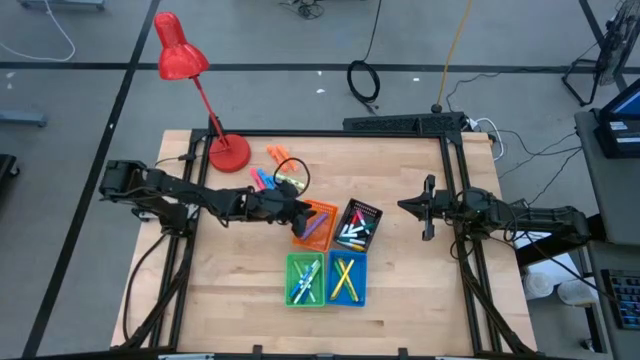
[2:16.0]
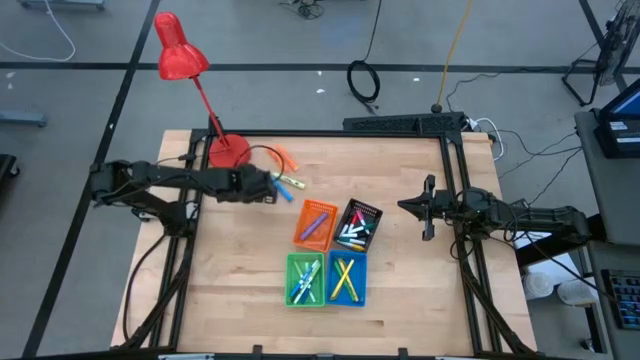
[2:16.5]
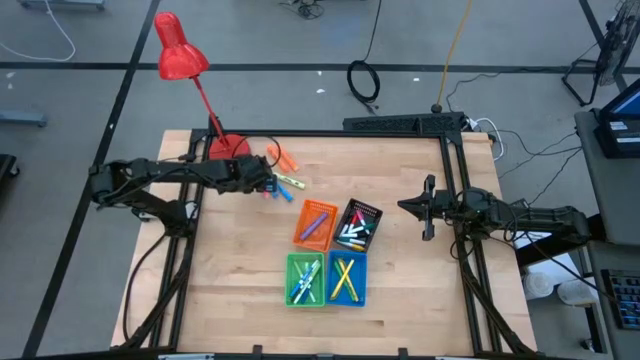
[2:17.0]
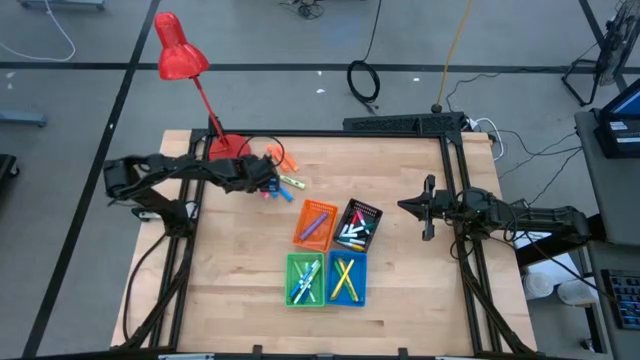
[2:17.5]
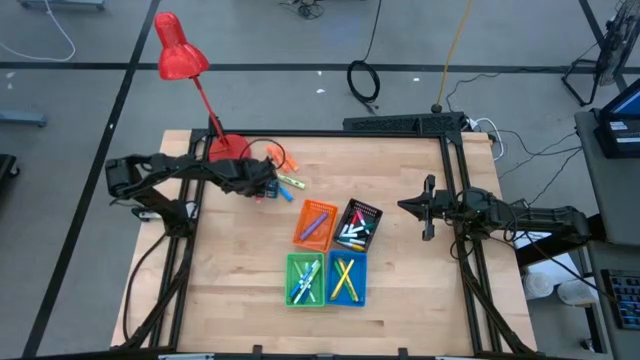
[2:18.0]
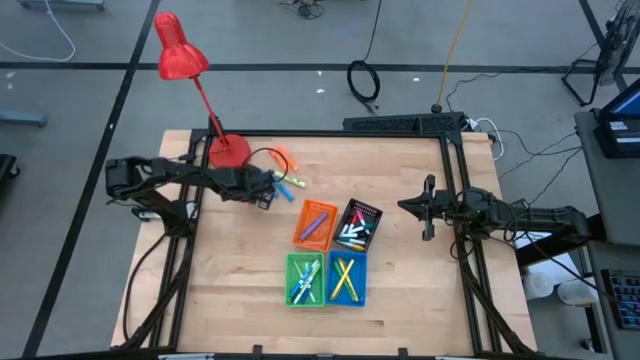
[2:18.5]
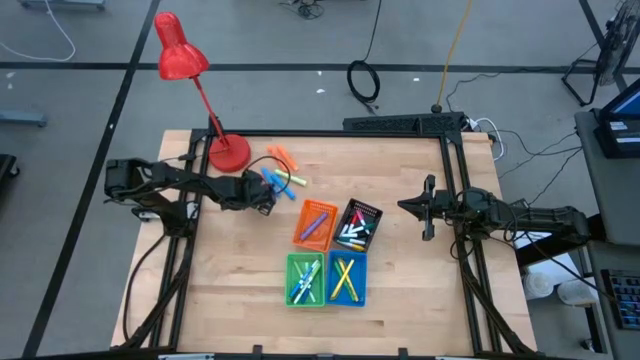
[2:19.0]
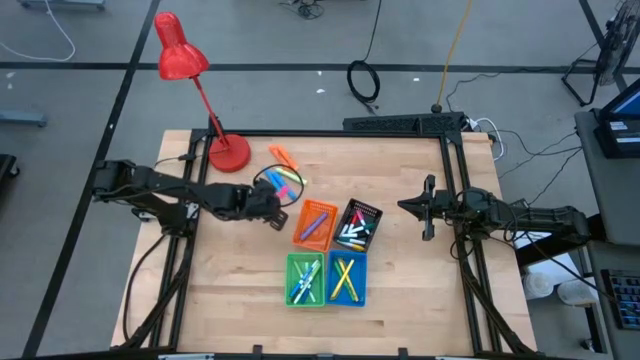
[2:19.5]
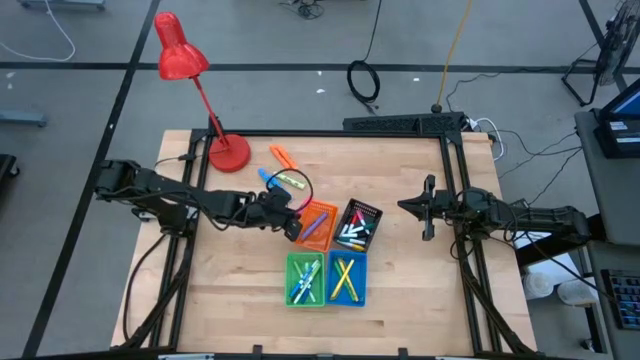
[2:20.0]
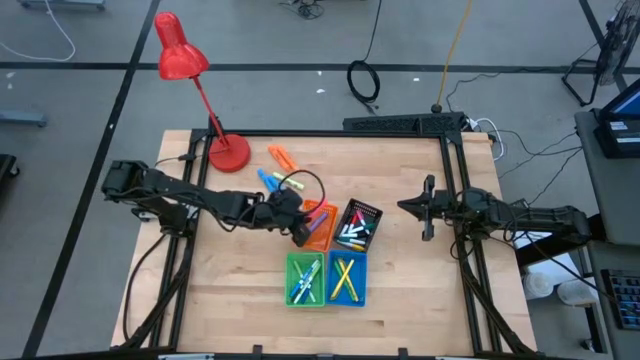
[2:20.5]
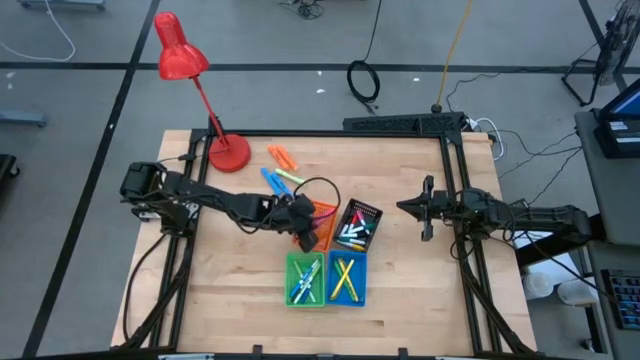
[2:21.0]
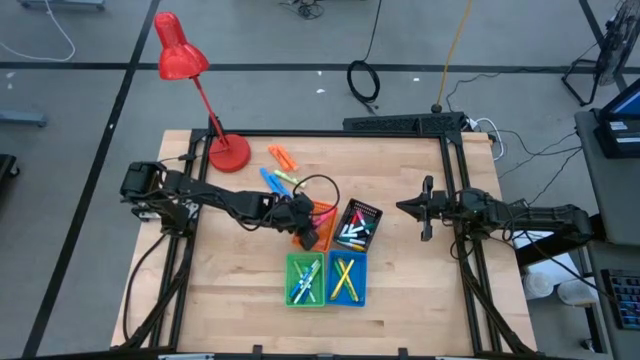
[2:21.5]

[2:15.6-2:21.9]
Task: Pick & Place Markers
Put the pink highlighter pen into the orange basket

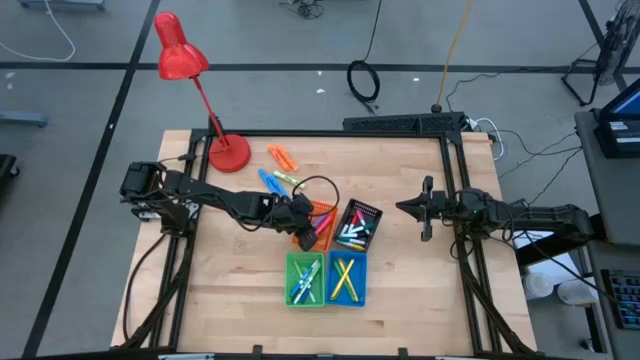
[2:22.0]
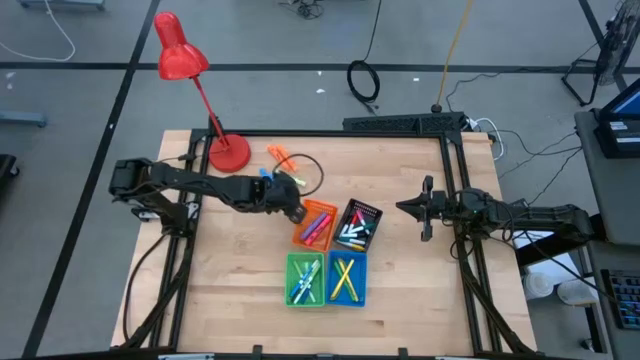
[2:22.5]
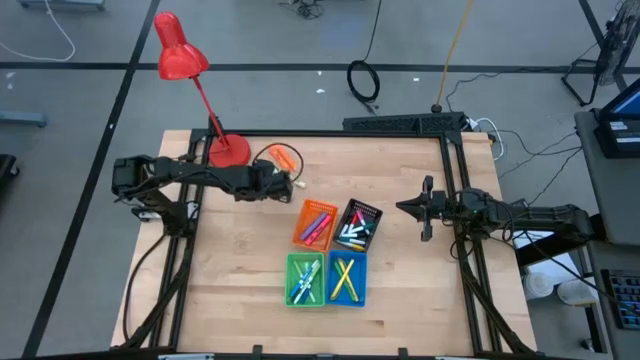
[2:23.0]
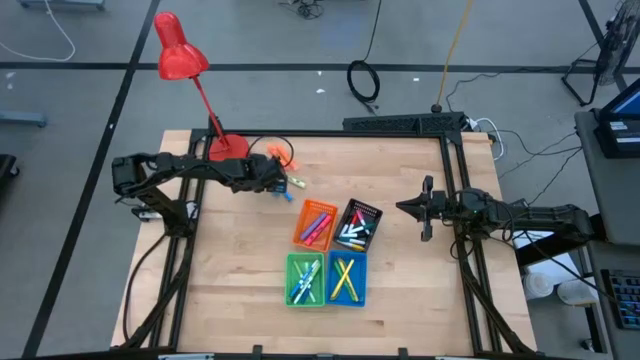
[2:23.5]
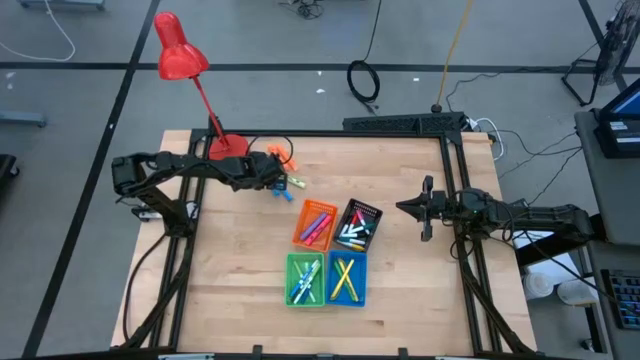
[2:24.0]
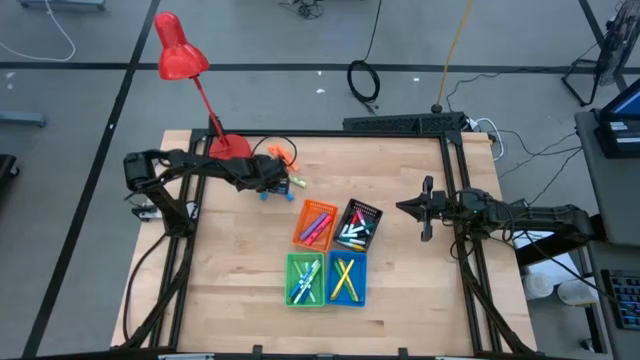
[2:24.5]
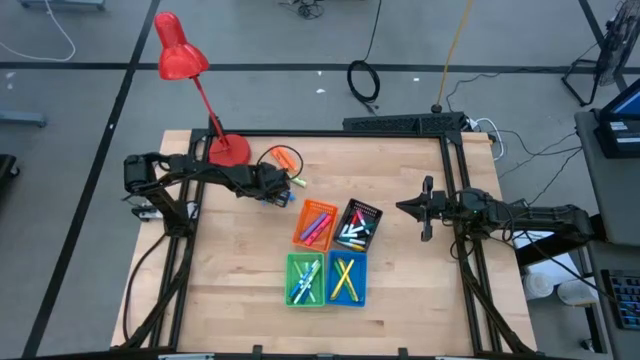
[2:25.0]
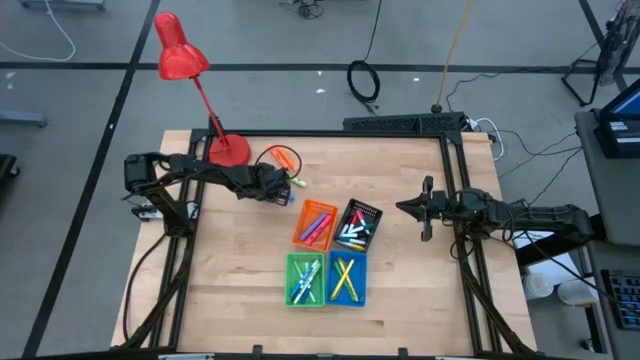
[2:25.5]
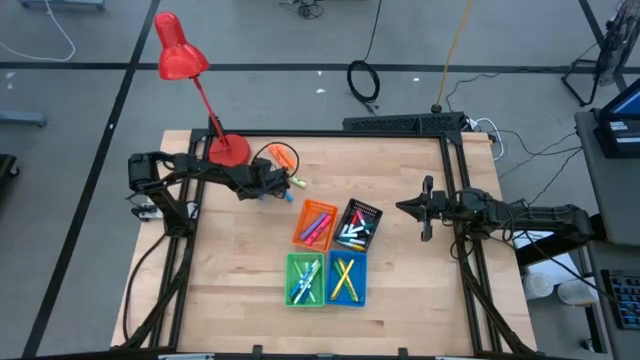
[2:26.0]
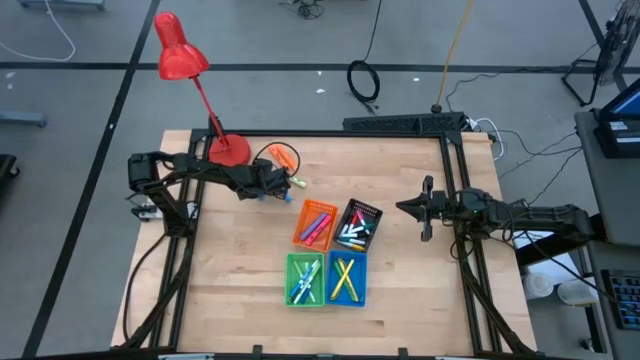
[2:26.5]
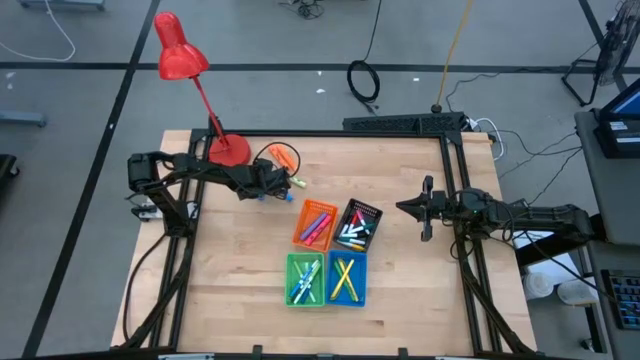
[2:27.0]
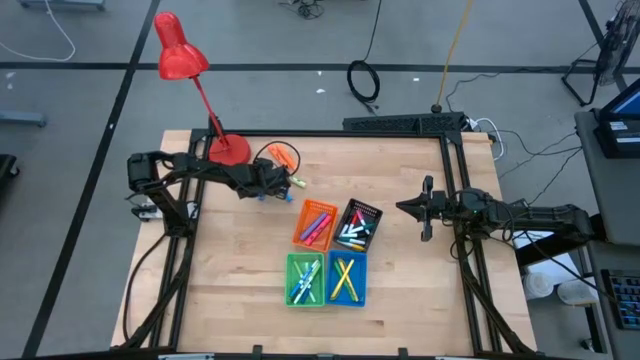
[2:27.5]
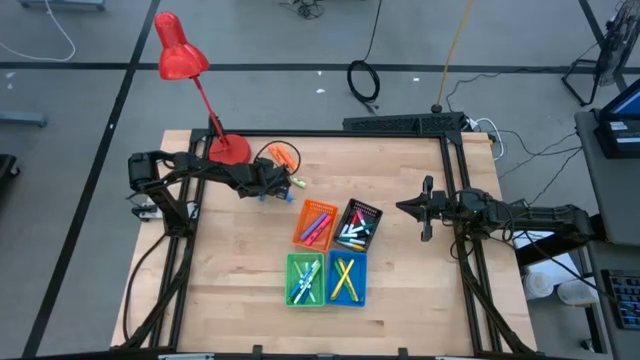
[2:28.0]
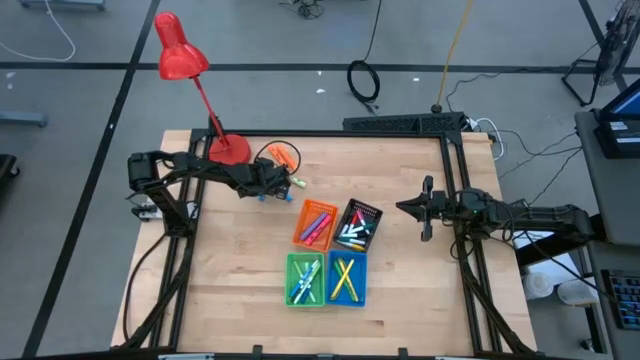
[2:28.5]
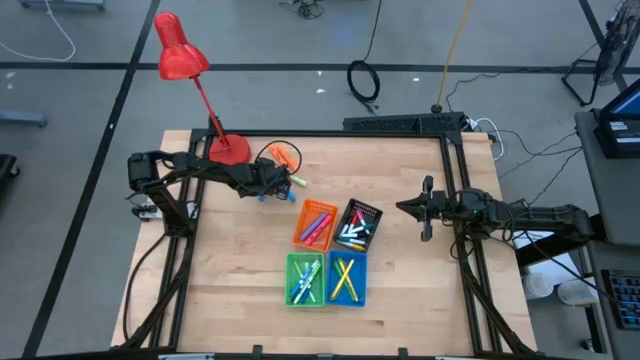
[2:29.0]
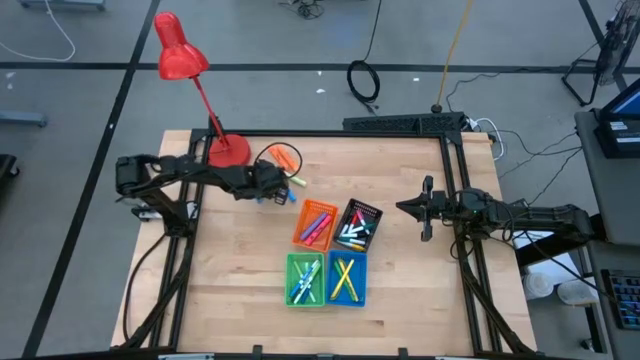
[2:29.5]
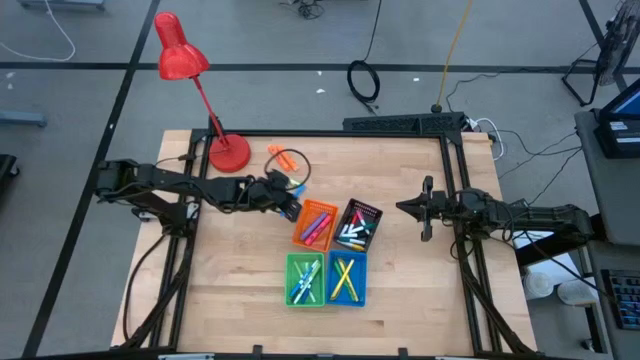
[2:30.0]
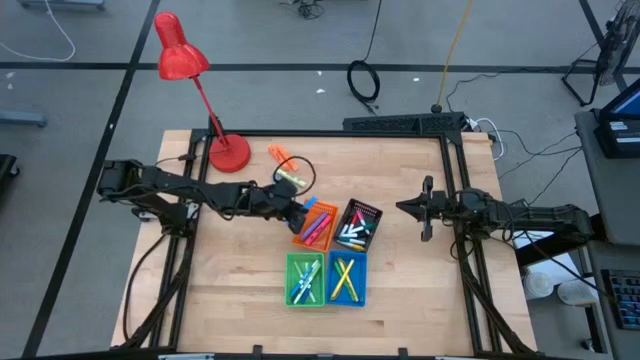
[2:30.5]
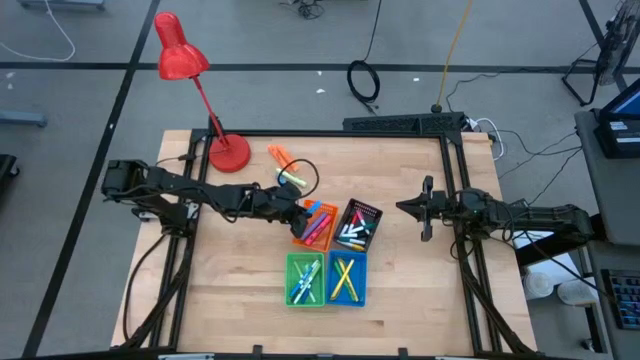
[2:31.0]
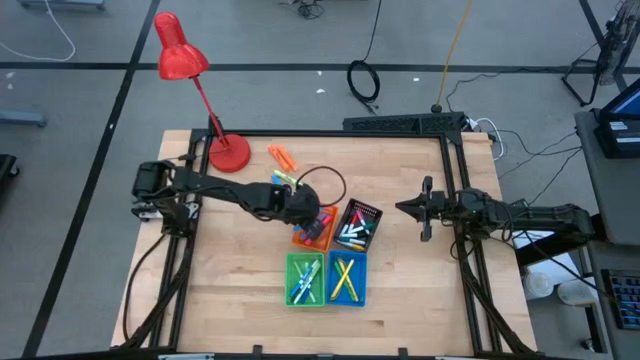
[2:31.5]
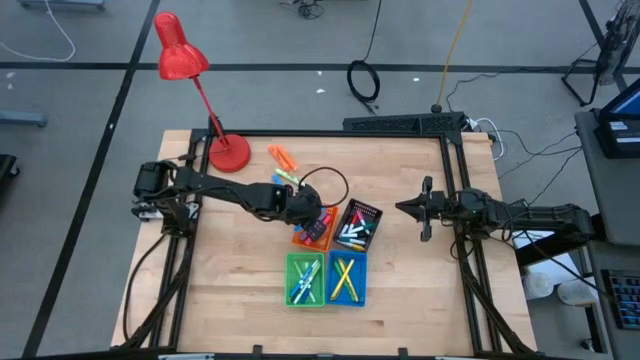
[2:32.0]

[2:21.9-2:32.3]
Put the left blue highlighter pen into the orange basket

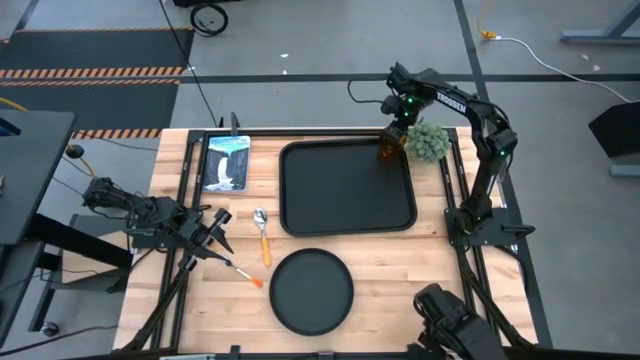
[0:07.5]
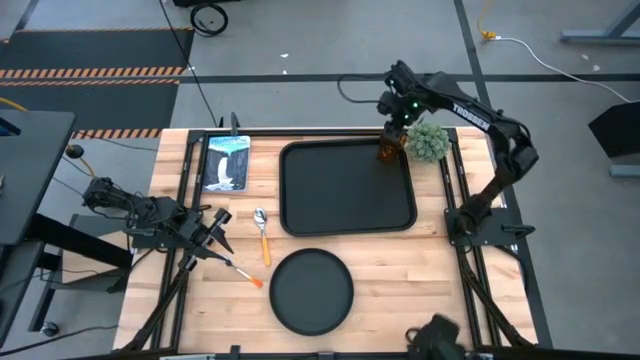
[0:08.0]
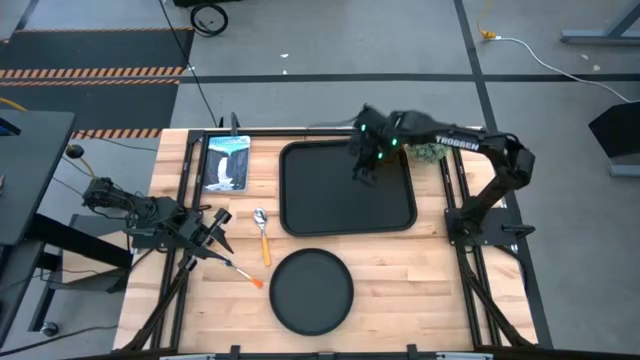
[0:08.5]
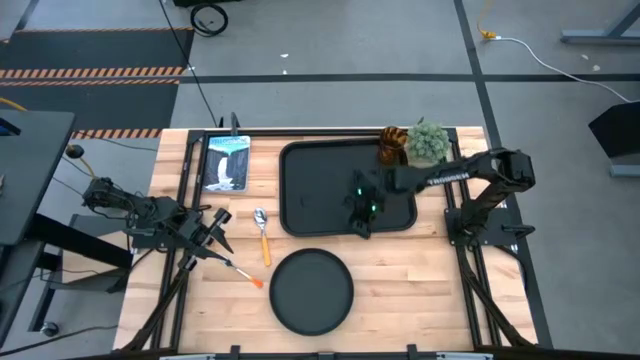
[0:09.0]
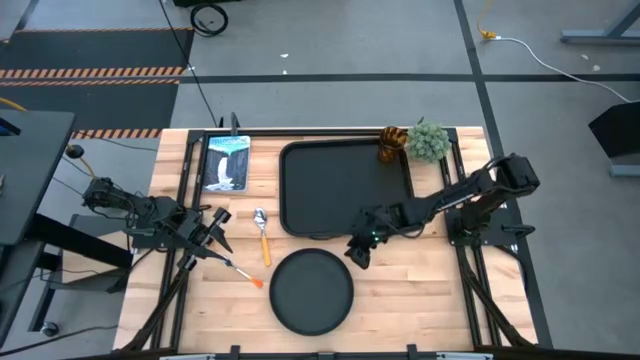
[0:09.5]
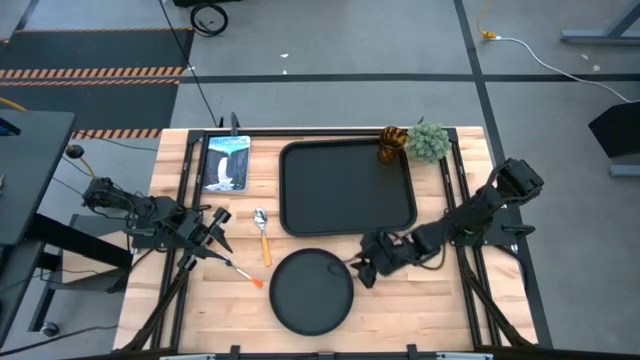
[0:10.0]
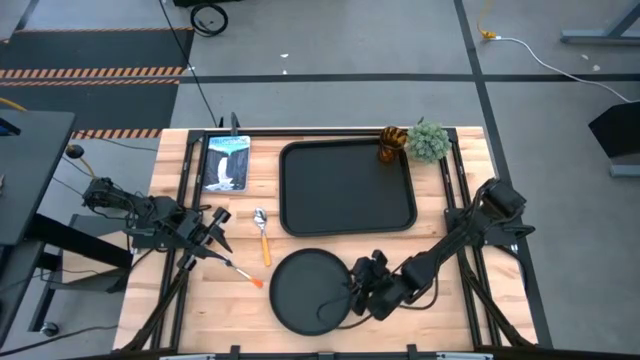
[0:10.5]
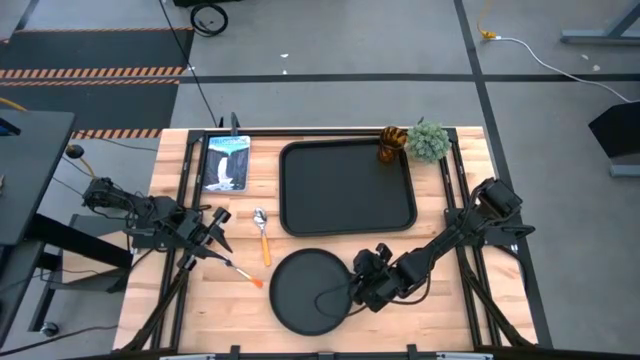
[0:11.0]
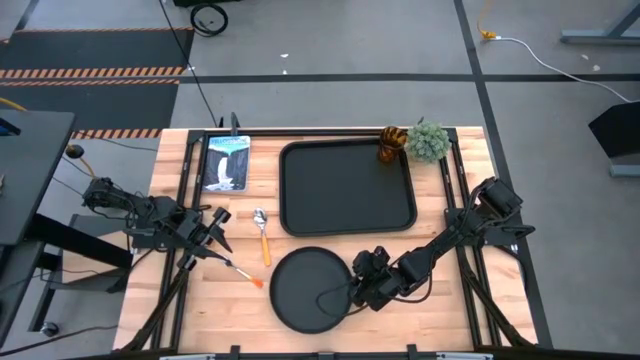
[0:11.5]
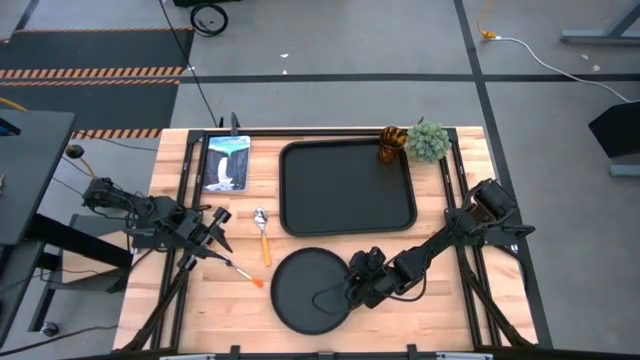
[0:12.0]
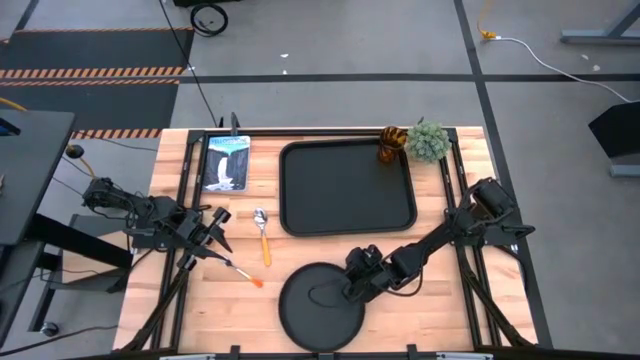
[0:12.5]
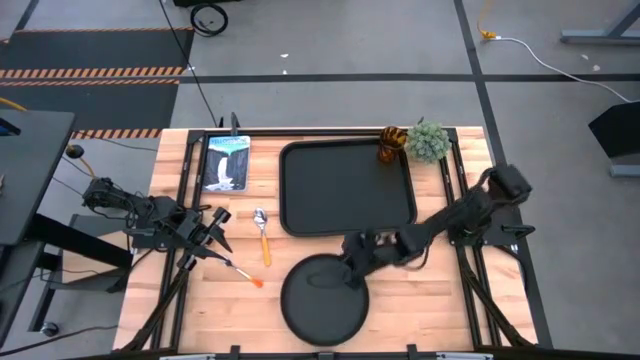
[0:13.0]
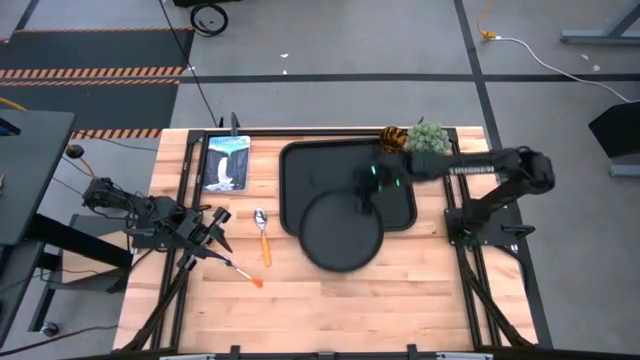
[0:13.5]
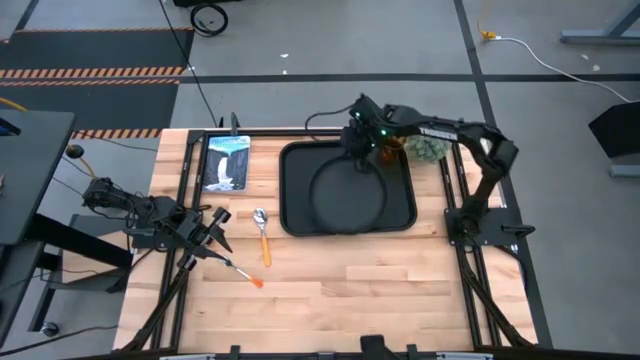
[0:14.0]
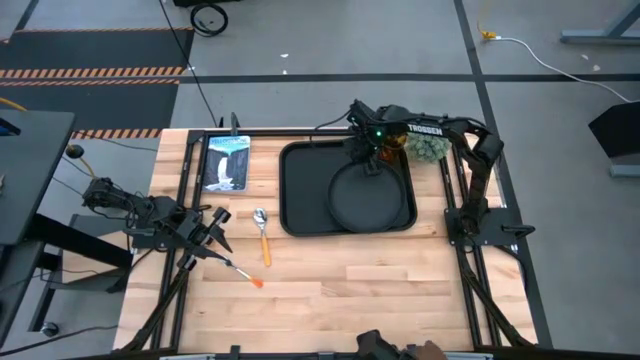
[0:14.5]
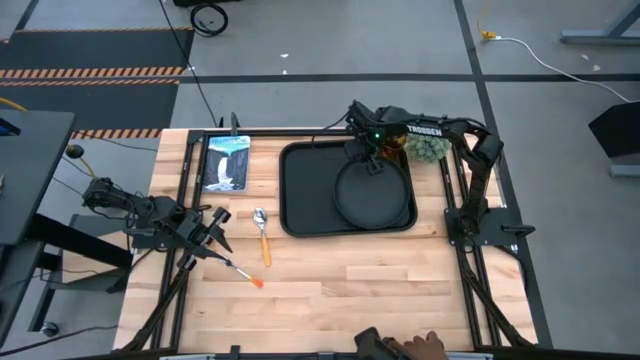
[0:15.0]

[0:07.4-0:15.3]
Task: Pick and place plate/cup/fork/spoon on tray
Put the black plate on the black tray
